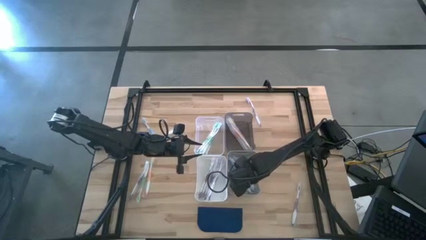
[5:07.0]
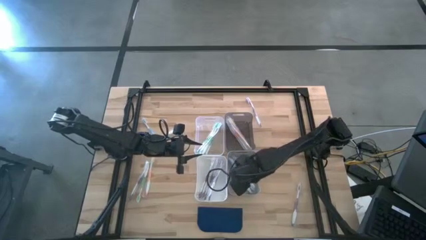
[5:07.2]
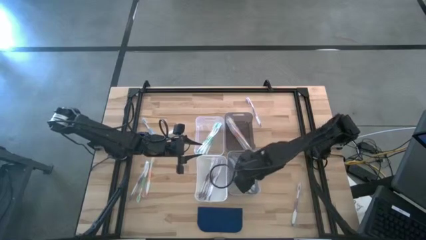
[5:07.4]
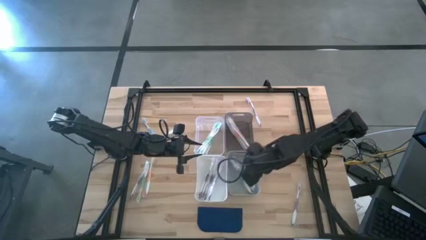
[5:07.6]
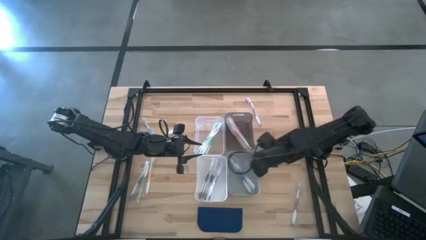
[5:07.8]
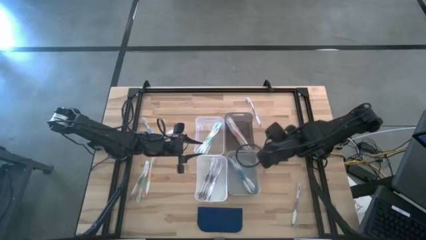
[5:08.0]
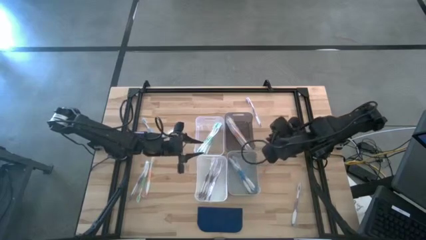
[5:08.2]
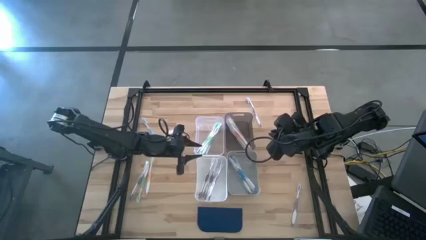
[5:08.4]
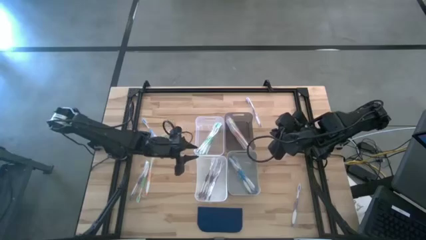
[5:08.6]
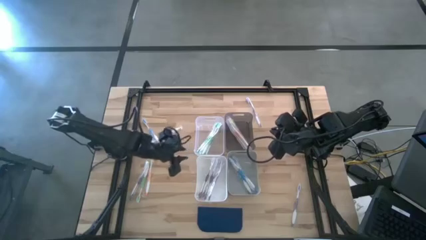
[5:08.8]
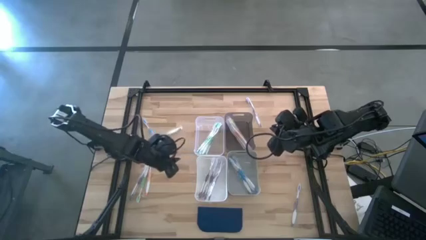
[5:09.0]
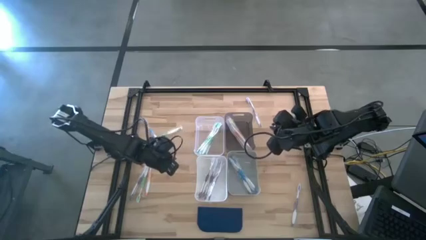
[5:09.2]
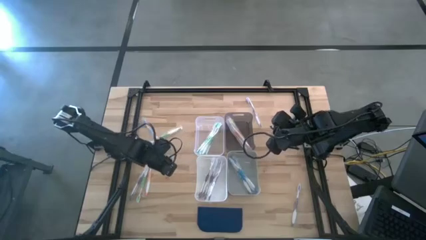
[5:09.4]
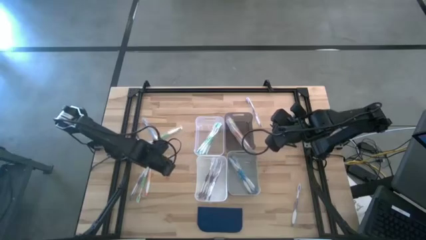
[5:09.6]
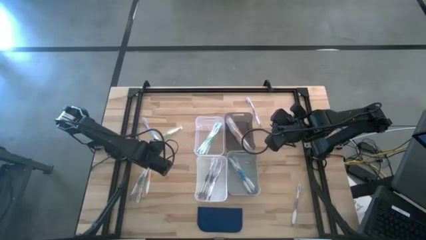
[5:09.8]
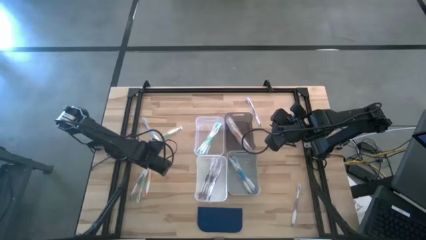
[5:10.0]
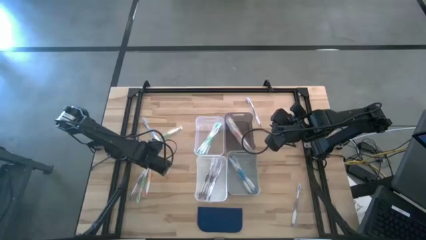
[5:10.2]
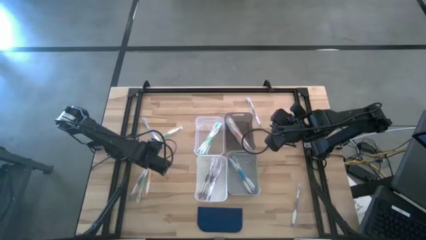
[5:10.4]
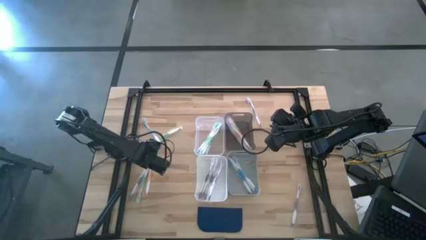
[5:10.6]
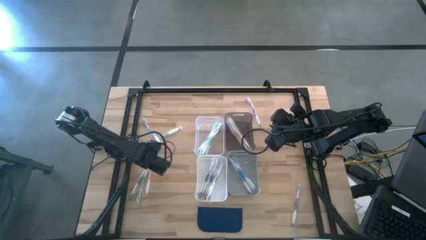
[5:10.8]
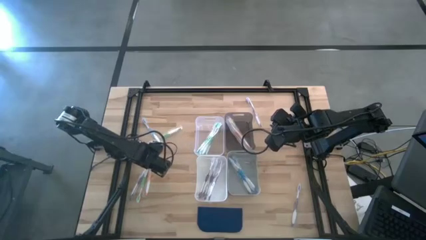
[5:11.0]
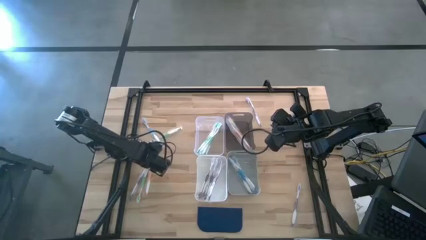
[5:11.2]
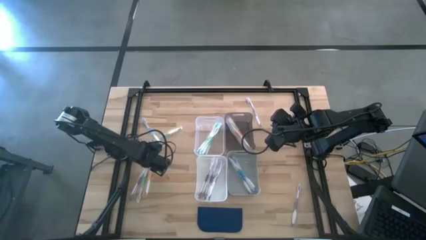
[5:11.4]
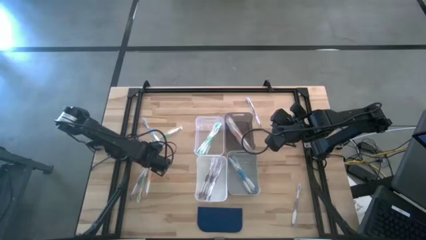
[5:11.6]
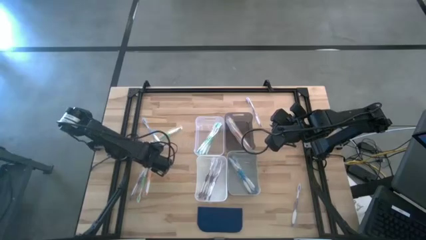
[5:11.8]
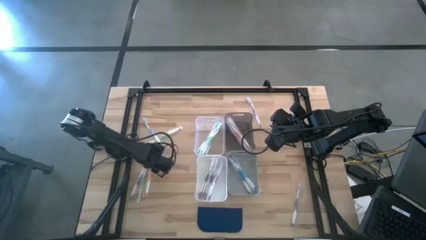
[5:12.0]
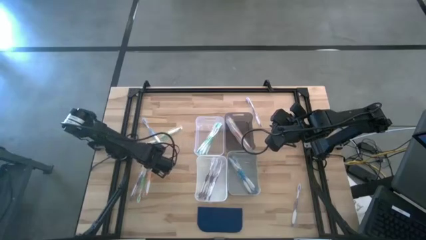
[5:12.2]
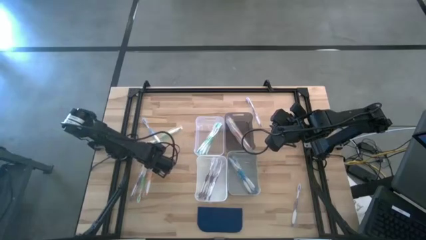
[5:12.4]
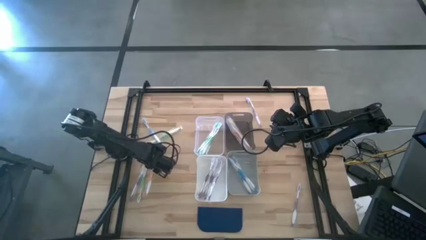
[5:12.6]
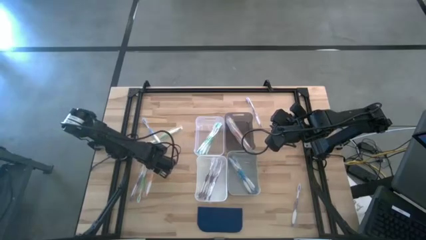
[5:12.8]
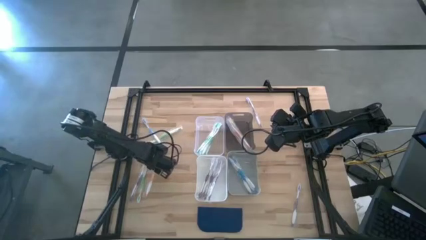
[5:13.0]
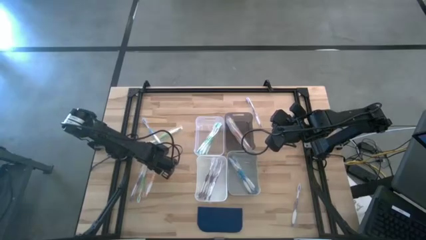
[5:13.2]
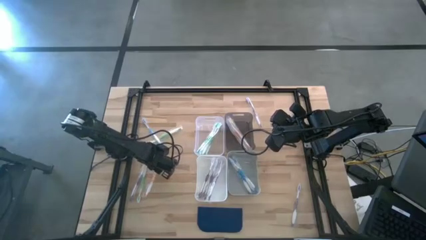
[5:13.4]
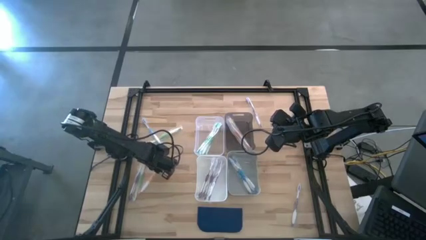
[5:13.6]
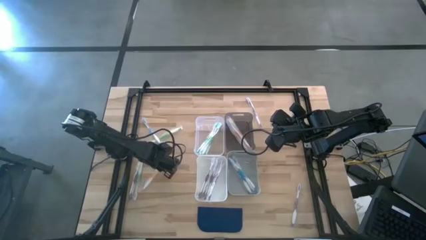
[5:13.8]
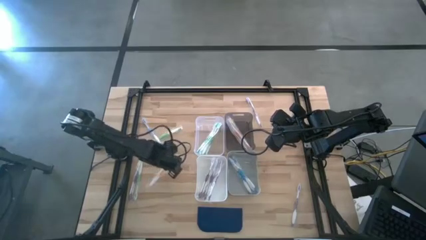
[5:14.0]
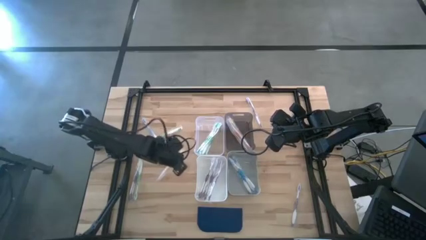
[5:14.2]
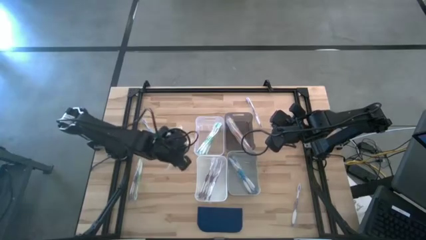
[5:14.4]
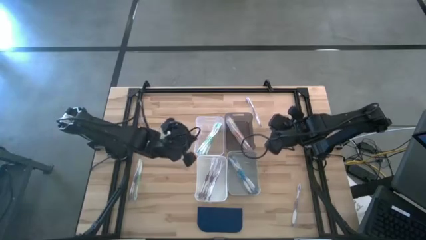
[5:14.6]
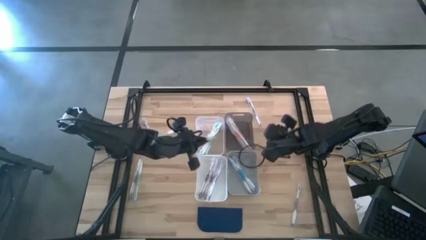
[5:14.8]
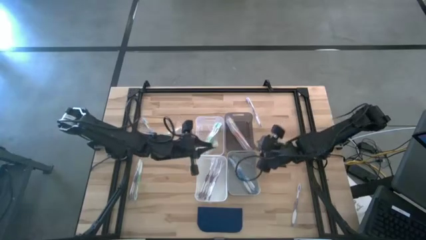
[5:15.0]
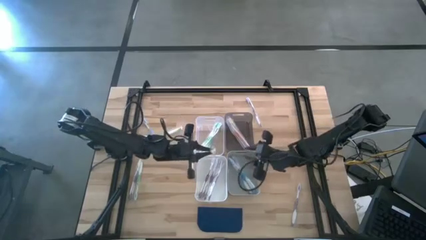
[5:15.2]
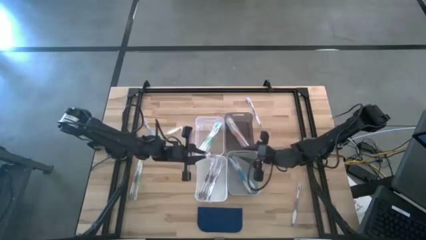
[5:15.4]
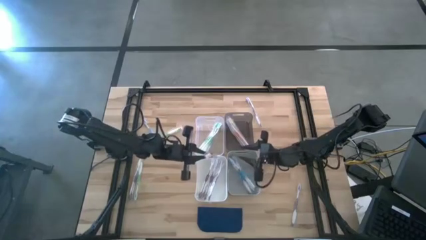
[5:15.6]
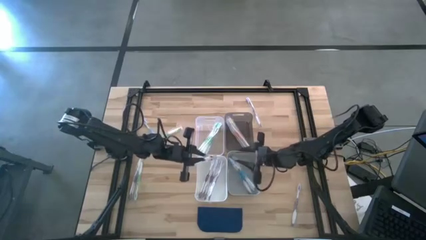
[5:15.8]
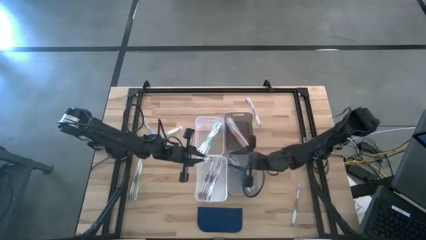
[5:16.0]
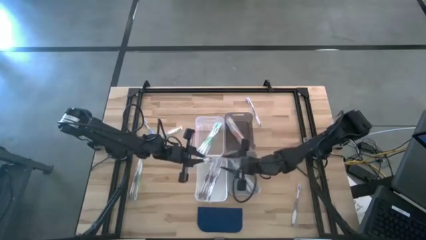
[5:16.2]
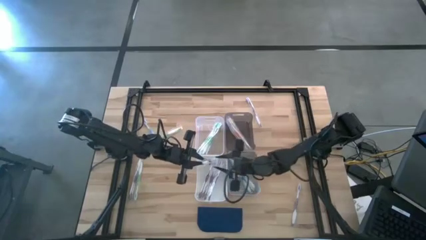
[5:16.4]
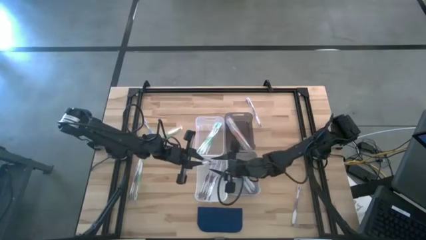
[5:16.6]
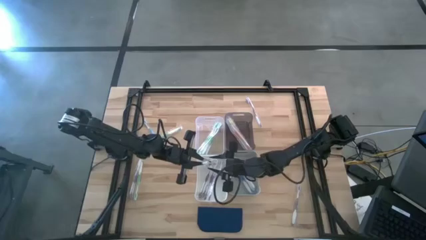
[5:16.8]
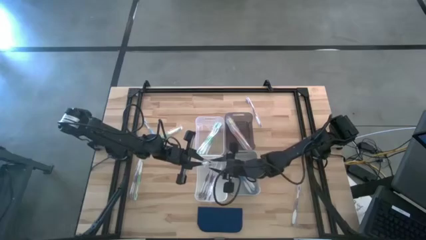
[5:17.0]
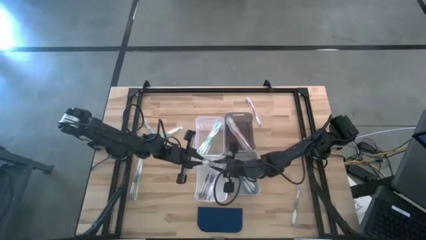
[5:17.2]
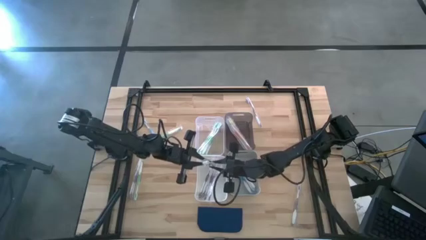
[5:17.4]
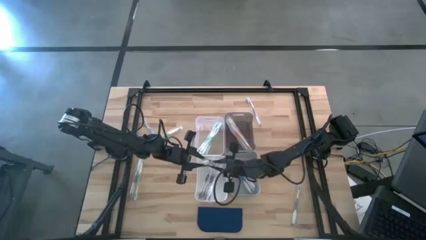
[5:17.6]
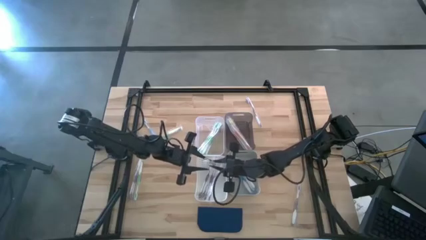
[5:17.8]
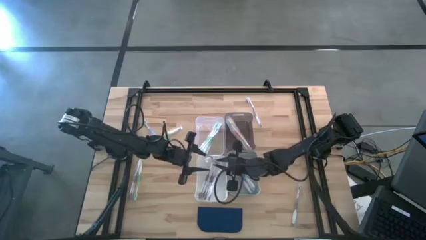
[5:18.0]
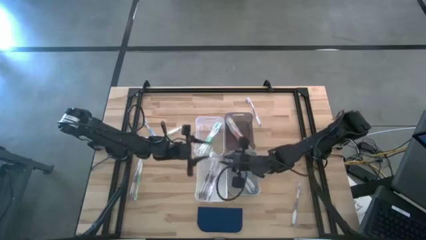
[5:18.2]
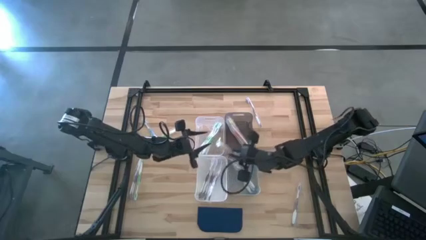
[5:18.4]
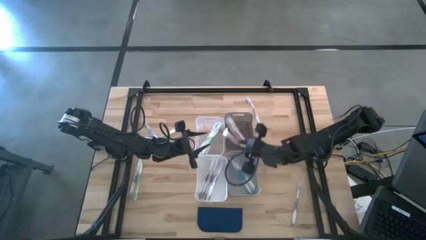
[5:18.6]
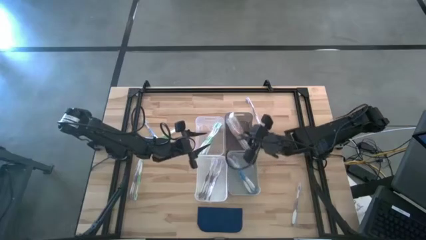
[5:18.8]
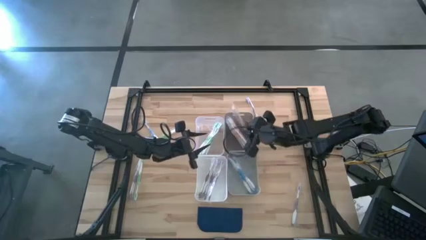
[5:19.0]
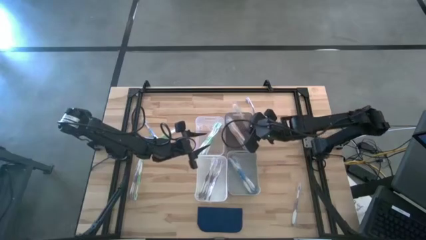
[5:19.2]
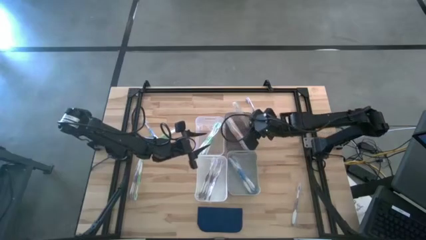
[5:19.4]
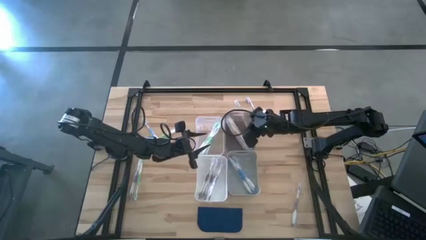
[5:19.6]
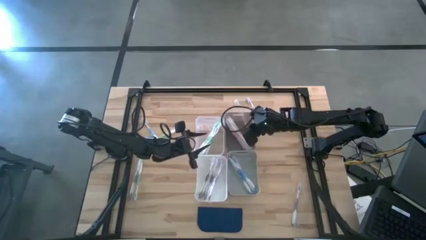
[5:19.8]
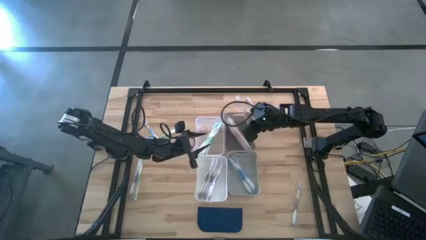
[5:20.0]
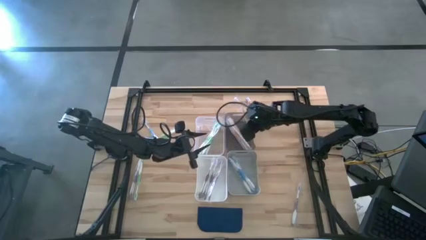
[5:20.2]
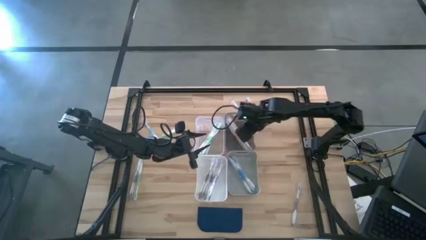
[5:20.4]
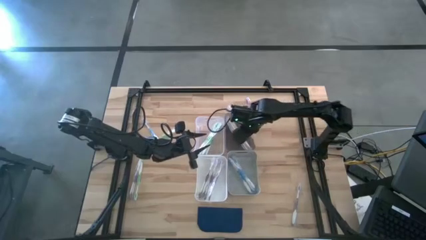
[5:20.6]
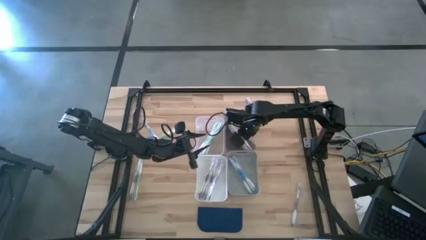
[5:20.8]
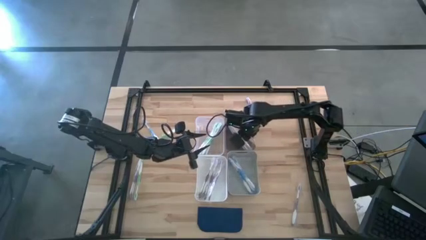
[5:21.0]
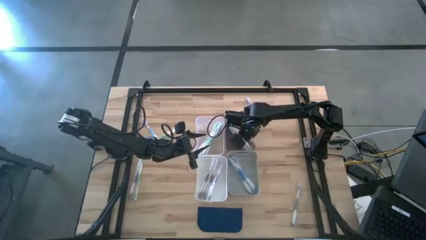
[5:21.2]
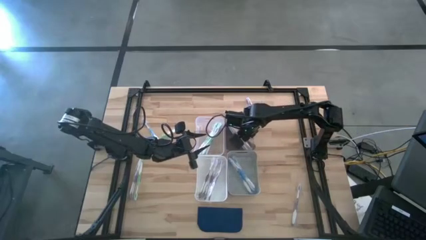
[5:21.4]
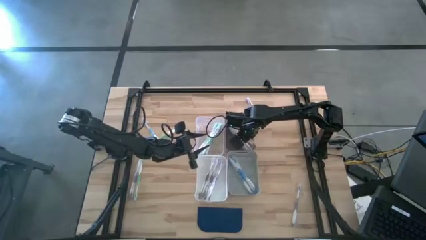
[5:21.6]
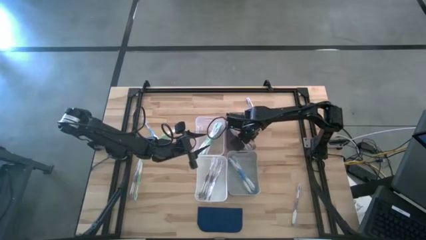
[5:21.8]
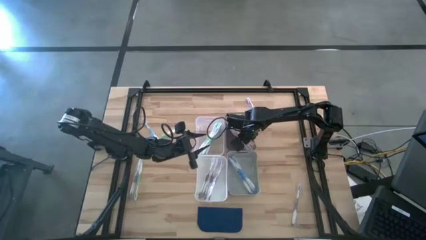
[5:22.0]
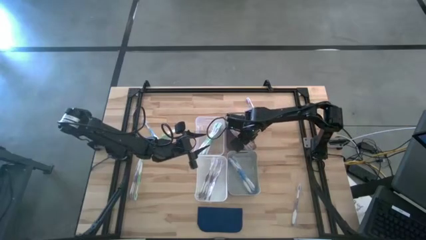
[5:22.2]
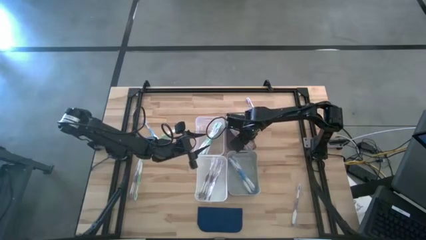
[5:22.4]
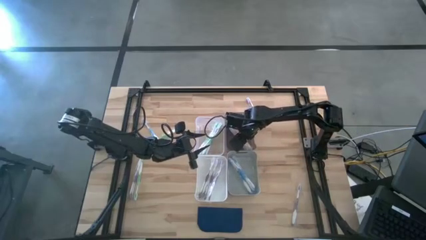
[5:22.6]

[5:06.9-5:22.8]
Task: Pick & Place Toothbrushes
Put the orange toothbrush into the black bin

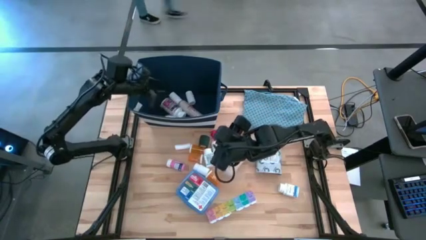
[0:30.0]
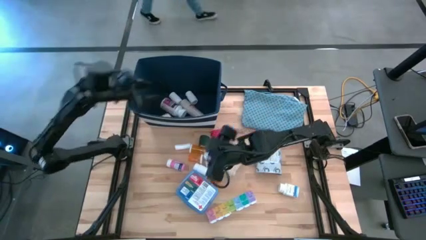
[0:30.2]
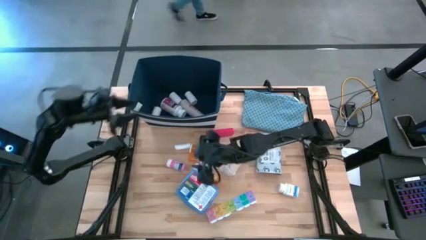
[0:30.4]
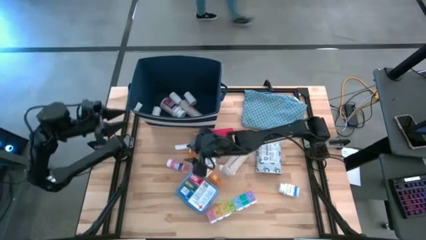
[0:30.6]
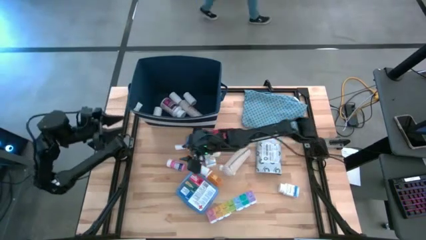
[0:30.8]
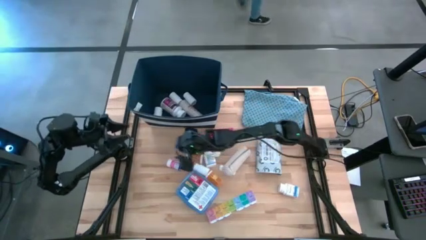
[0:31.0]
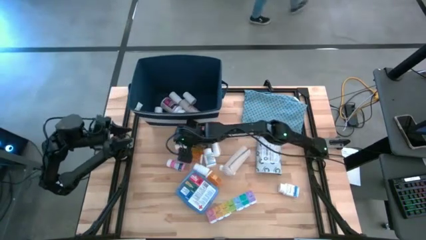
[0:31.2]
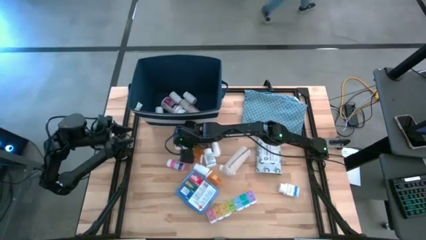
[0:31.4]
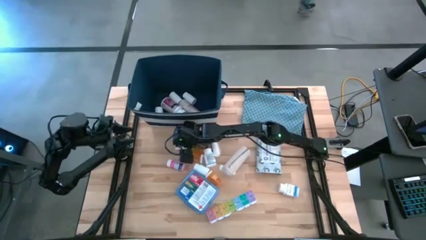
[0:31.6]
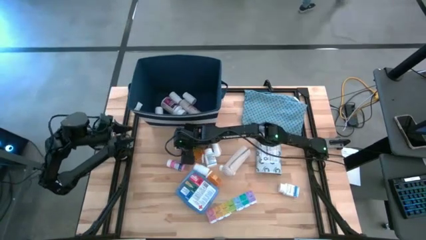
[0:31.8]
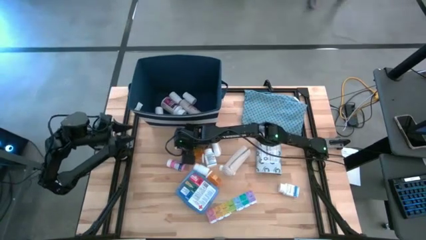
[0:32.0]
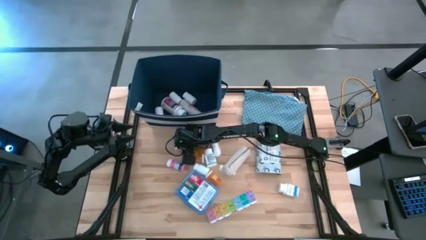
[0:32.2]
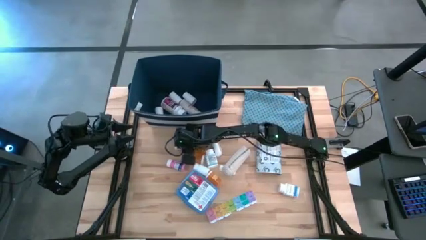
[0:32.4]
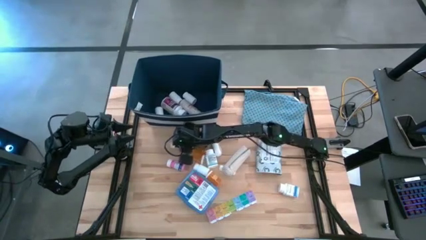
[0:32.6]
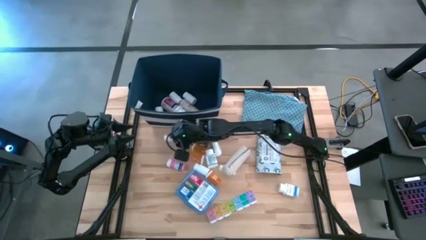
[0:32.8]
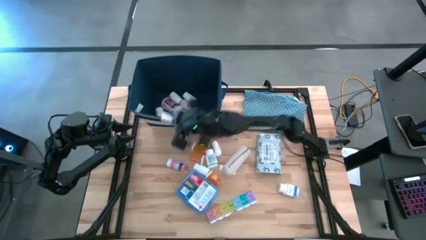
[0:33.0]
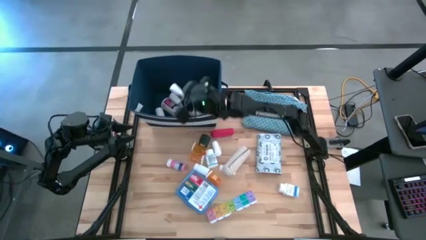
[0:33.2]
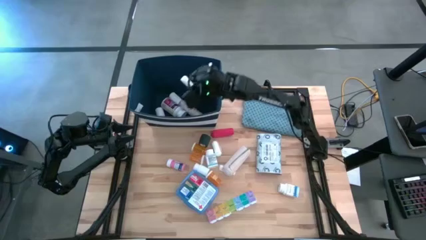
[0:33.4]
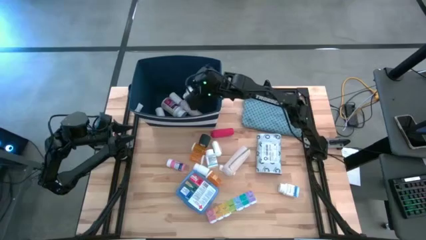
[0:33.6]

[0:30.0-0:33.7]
Task: Pick & place medical supplies in basket/bin
Put the rolled gauze into the blue bin
